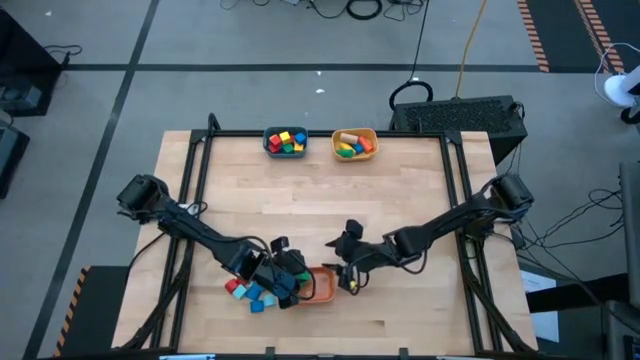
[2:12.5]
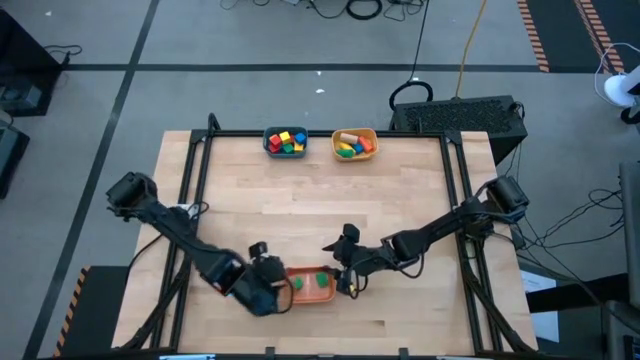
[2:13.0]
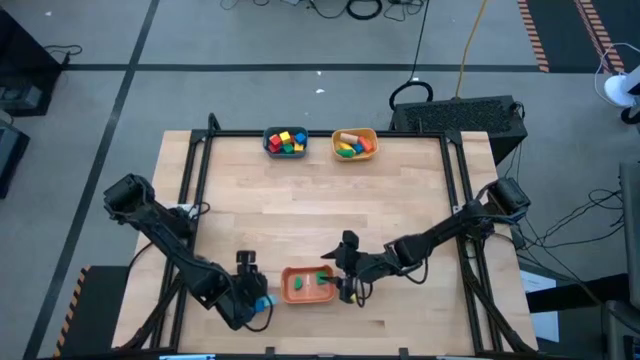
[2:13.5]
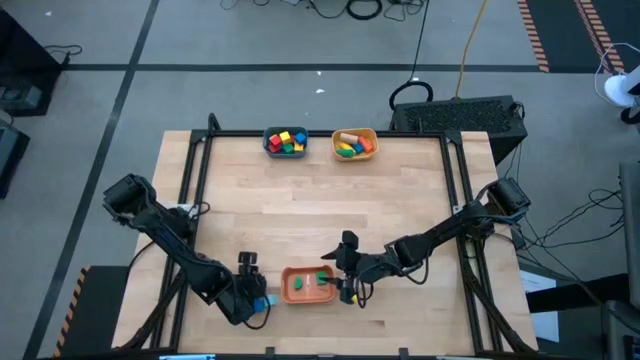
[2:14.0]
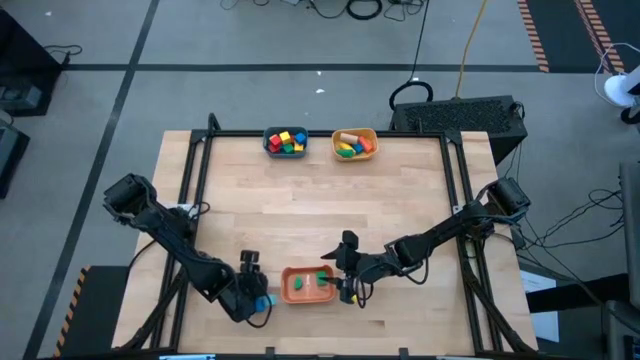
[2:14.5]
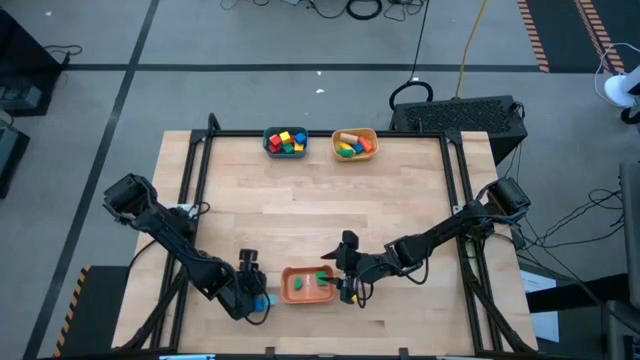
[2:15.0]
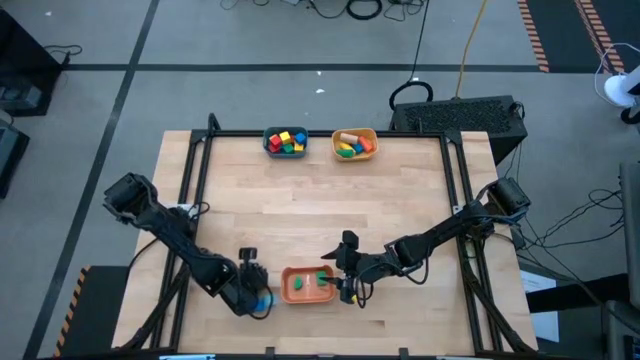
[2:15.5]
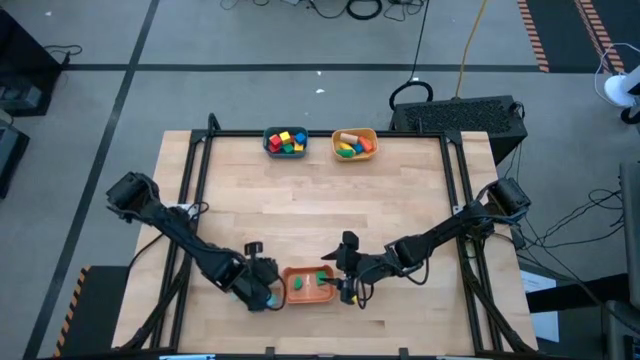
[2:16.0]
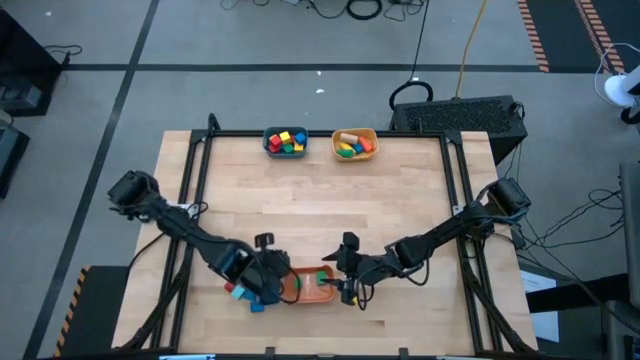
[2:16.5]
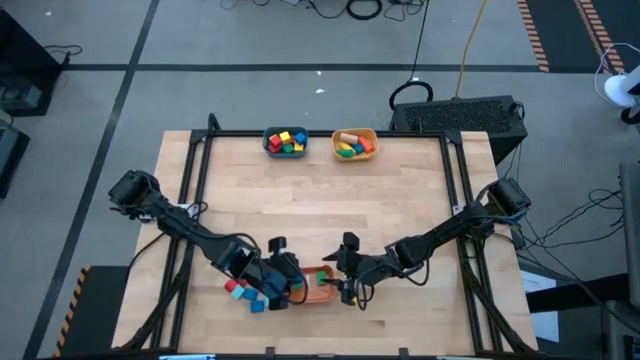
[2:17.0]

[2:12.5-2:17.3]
Task: Sort blocks by size
Put the blue half circle block into the orange bin

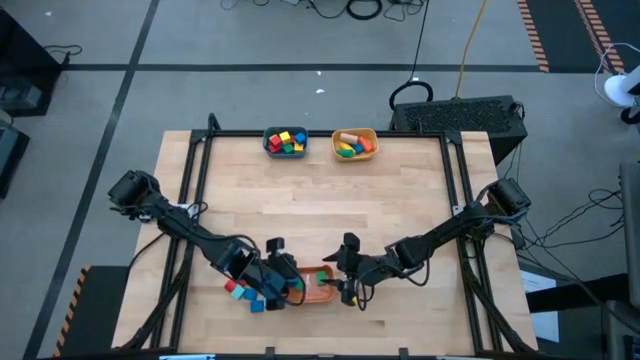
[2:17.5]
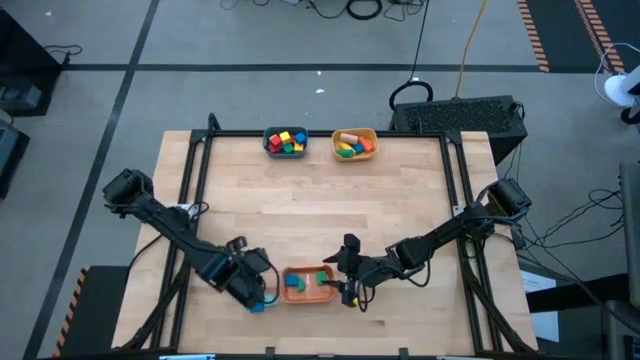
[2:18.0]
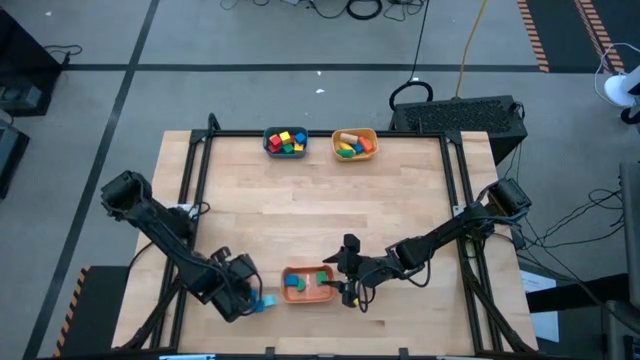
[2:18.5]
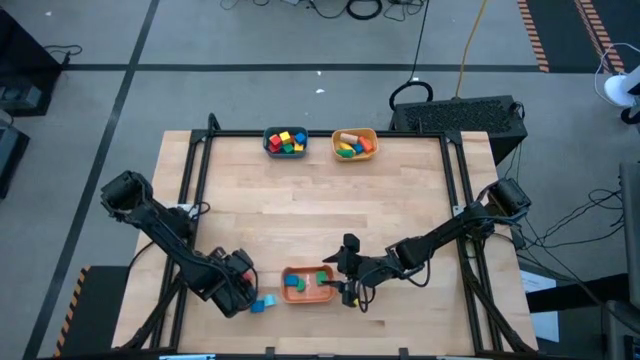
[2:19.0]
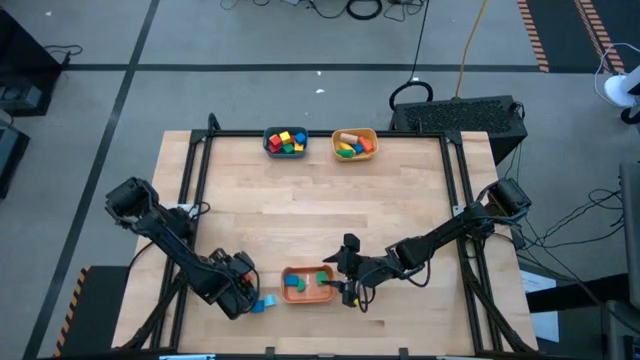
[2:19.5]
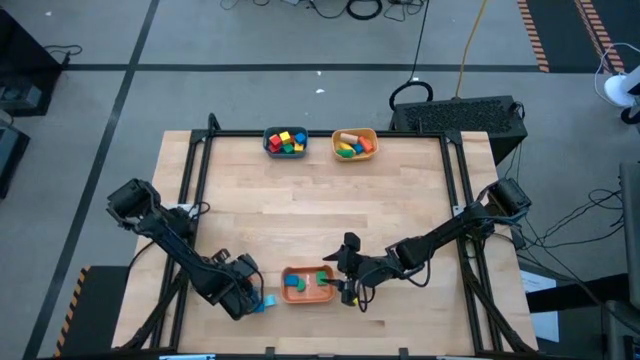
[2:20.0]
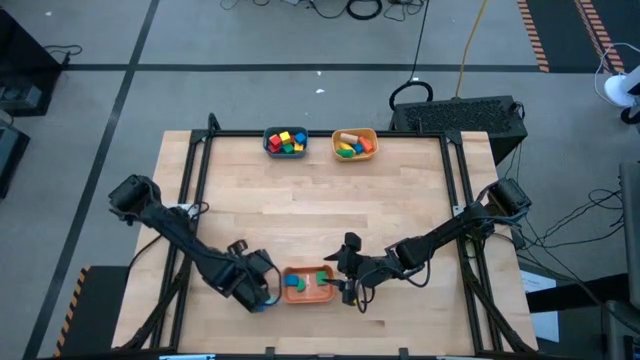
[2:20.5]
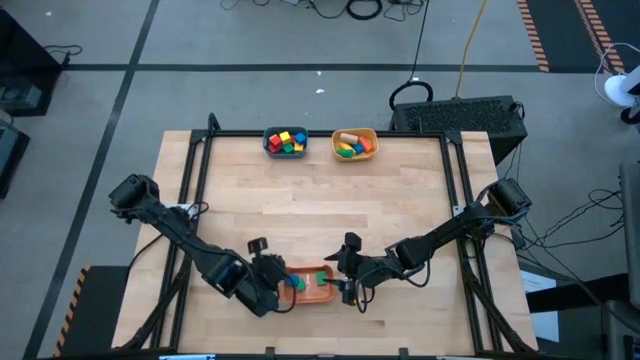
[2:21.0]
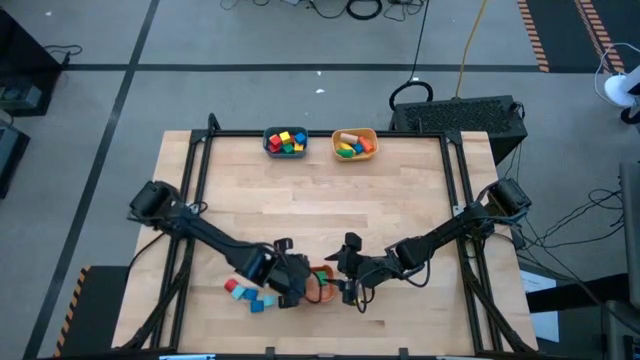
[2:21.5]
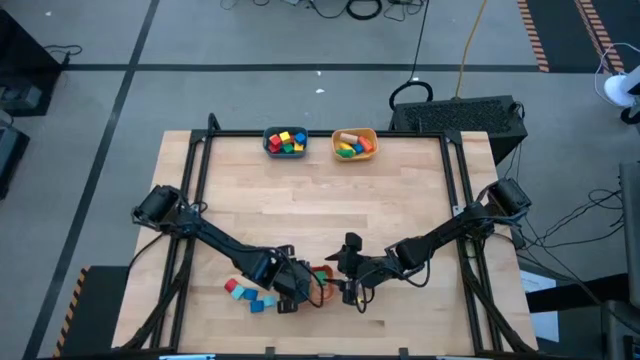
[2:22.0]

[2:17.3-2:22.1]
Put the red half circle block into the orange bin

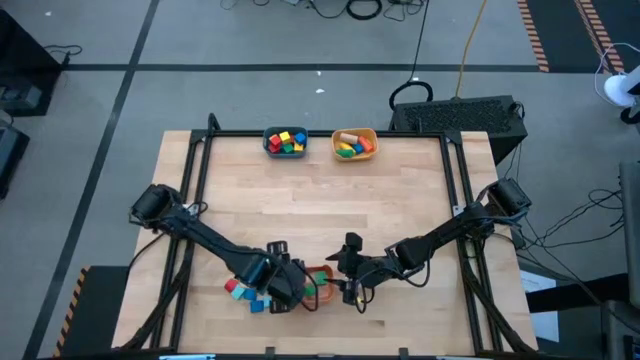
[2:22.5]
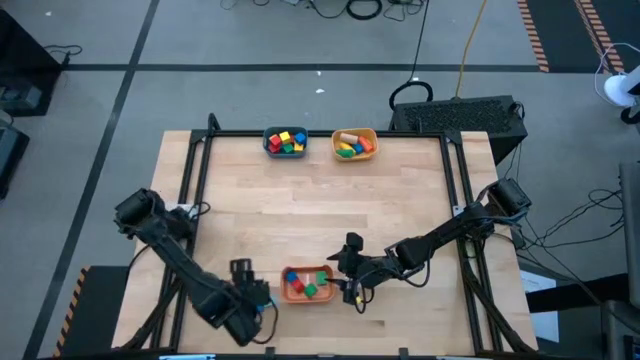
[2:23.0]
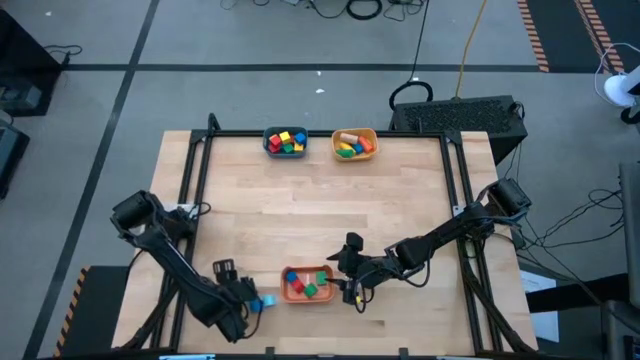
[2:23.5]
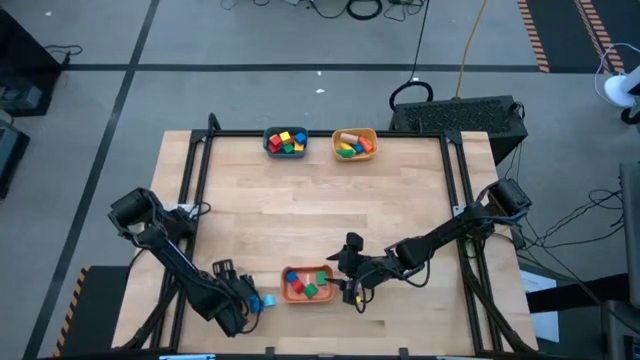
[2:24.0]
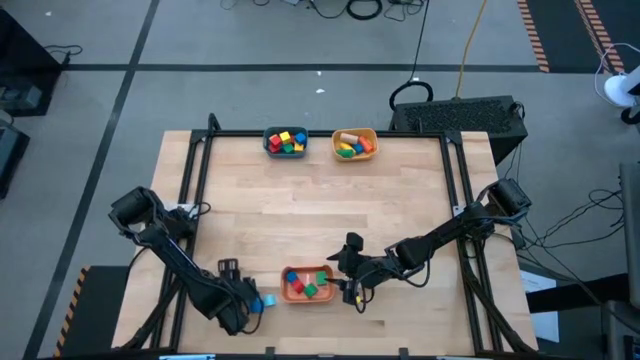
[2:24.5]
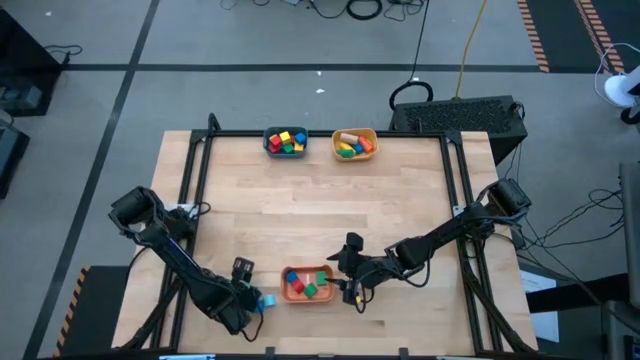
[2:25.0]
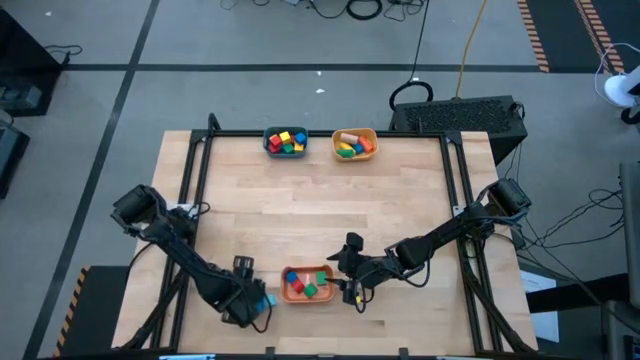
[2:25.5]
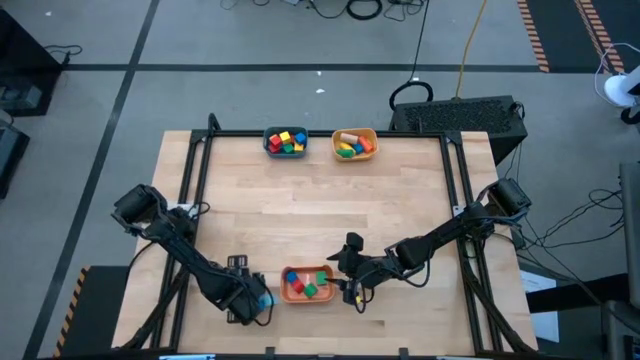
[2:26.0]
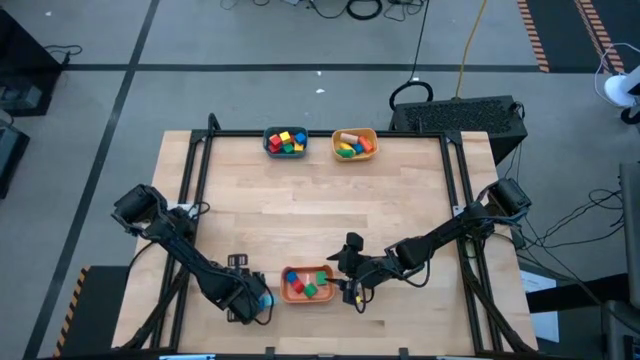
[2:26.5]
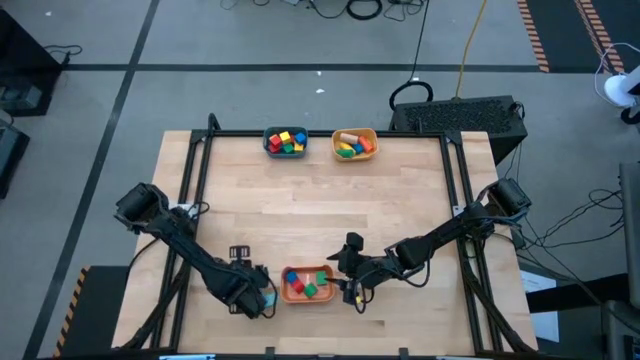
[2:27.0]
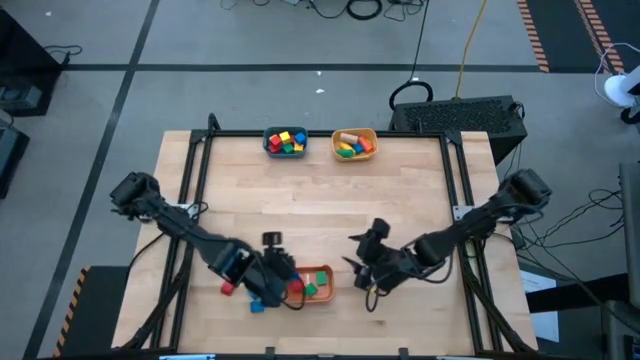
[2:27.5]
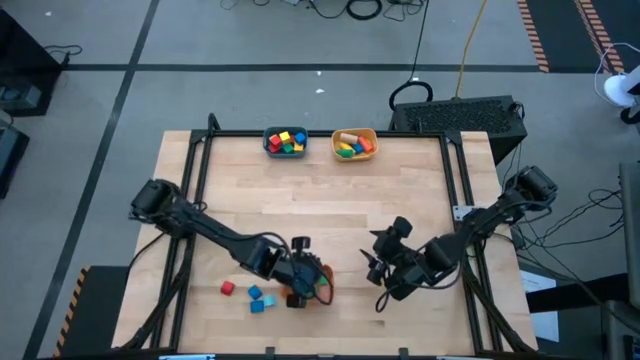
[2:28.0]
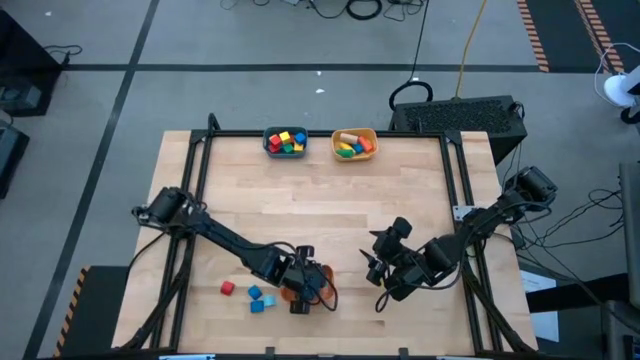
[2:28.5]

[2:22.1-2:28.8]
Put the light blue half circle block into the orange bin

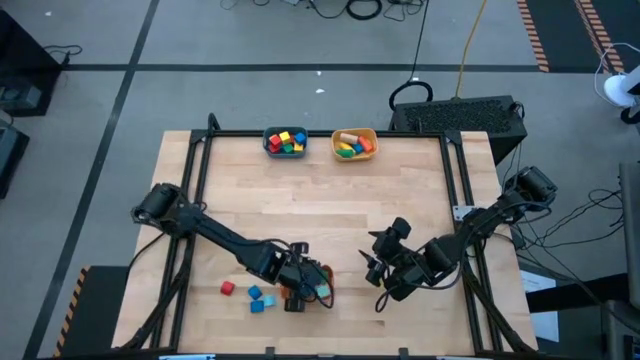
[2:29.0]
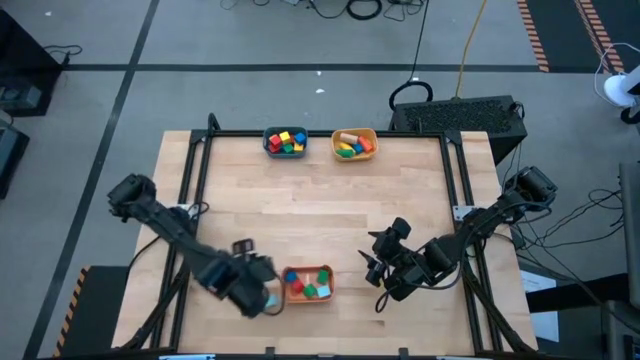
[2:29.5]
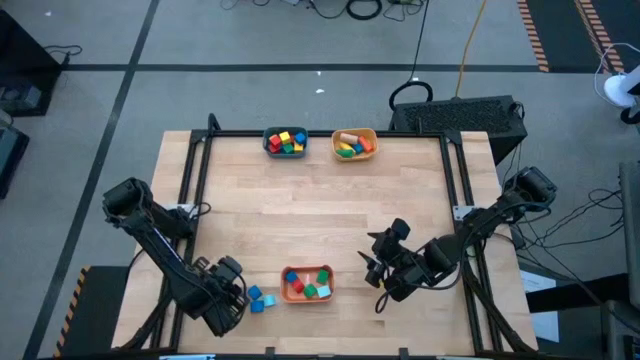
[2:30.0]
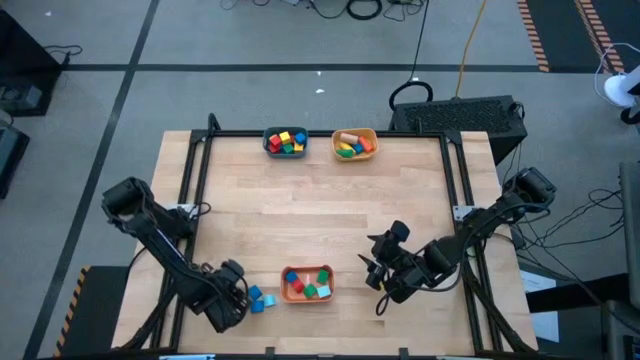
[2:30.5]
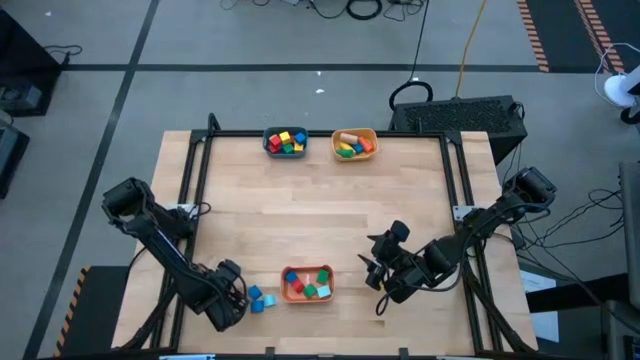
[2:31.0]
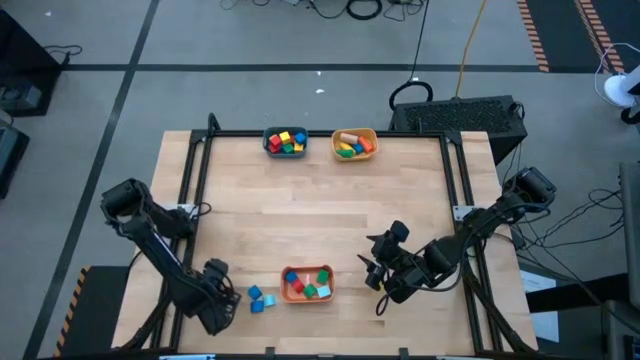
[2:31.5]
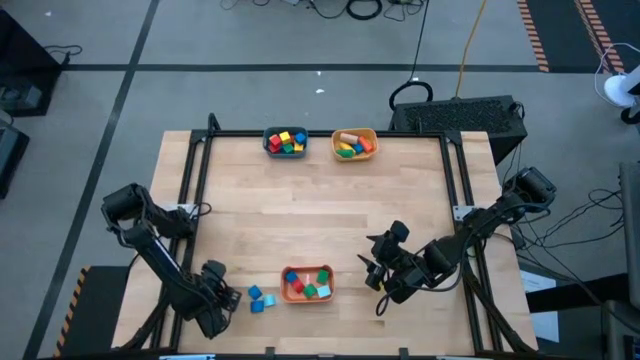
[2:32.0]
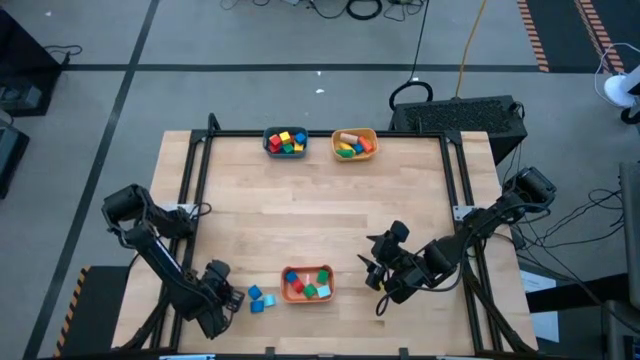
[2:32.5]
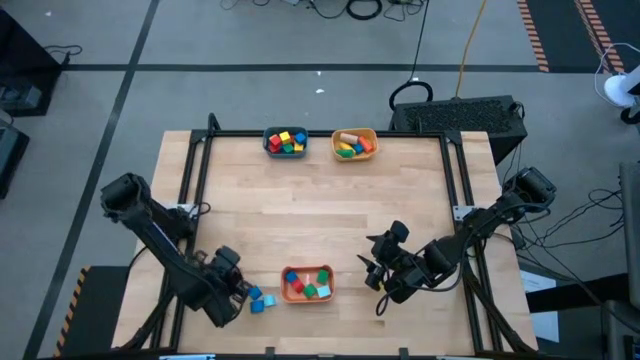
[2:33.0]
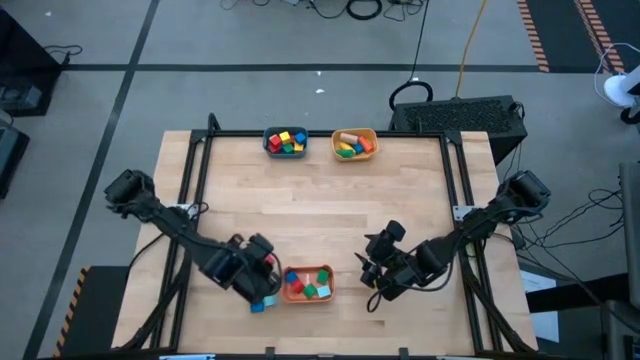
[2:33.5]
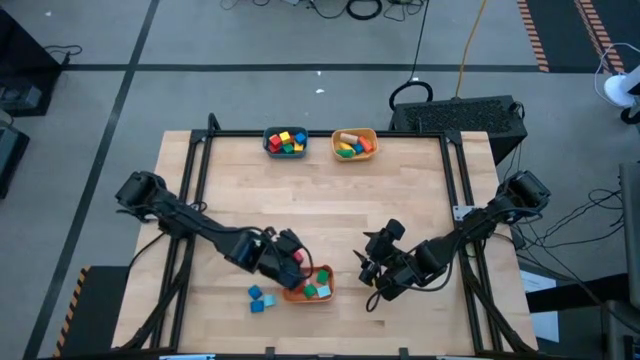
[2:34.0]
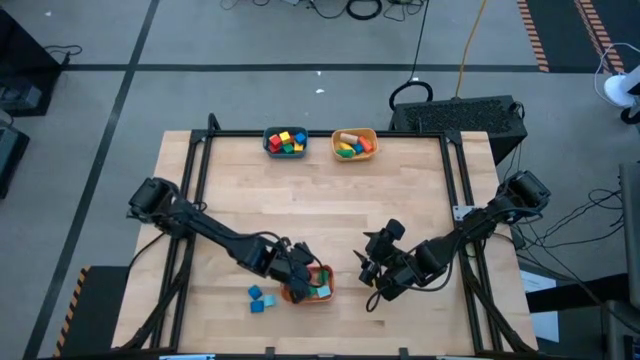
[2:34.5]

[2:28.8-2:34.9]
Put the red half circle block into the orange bin
